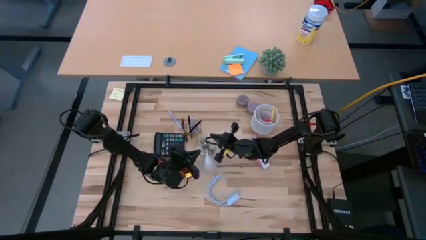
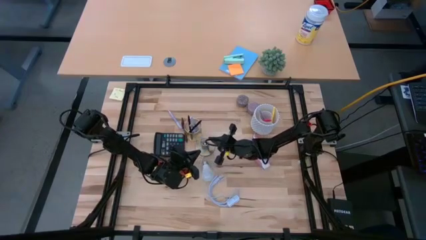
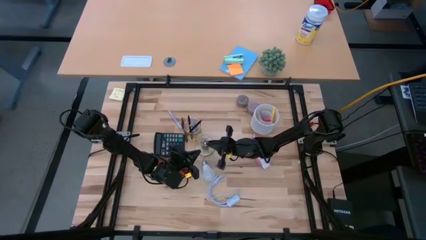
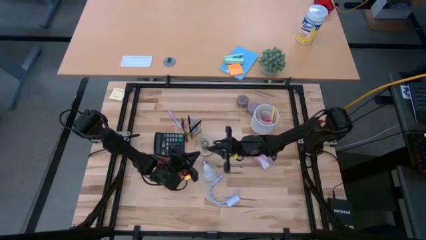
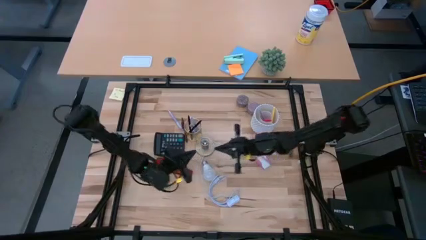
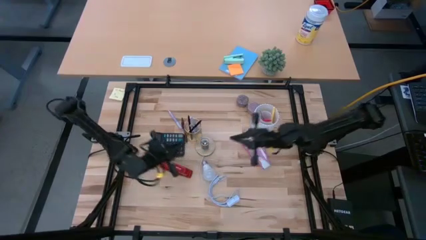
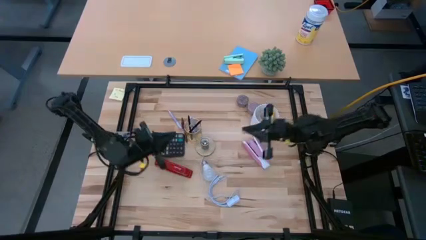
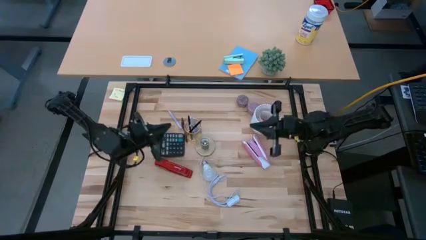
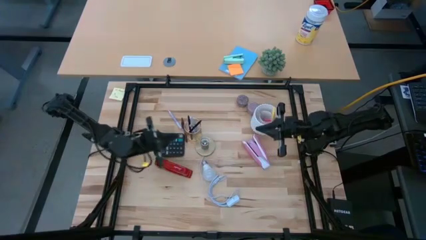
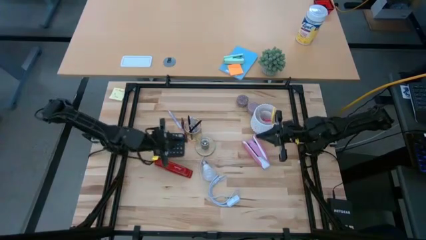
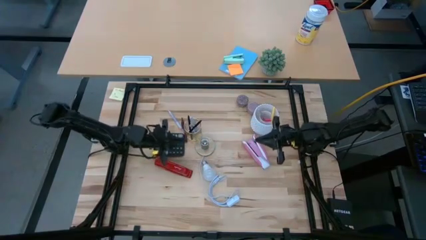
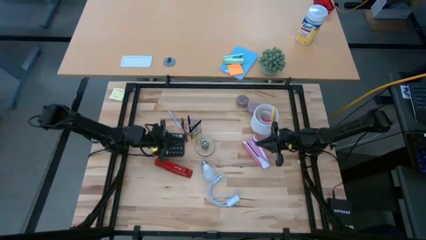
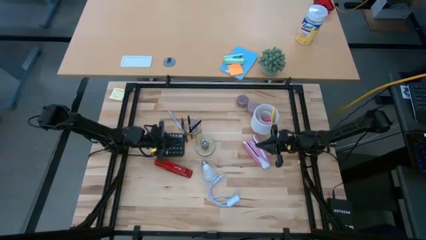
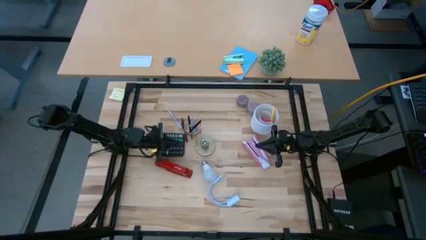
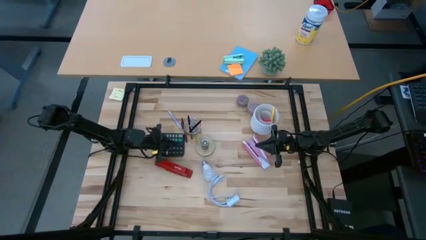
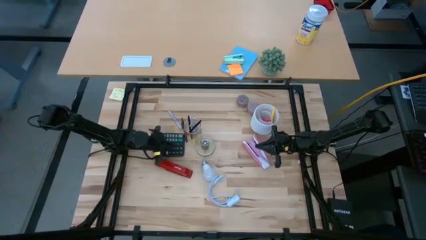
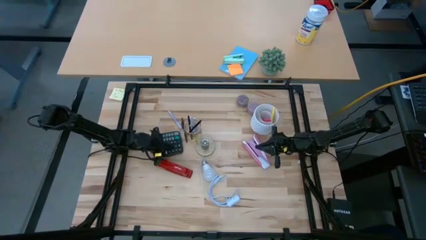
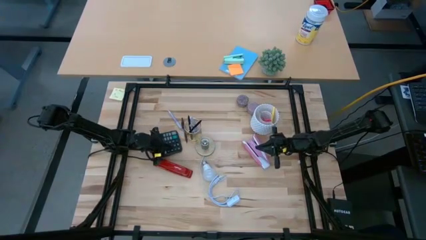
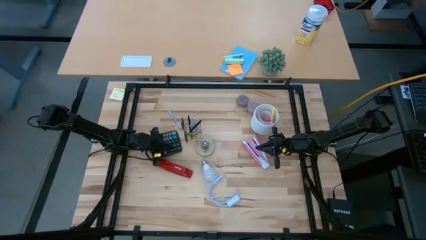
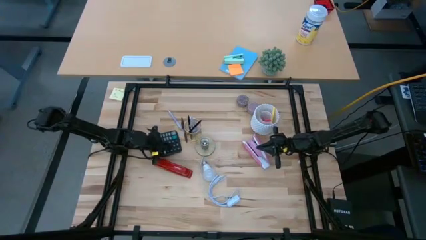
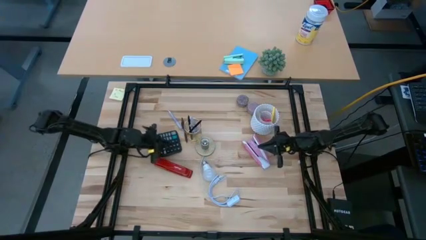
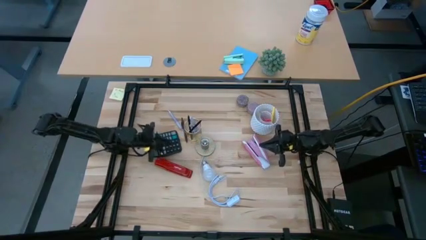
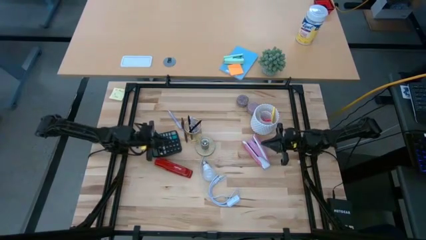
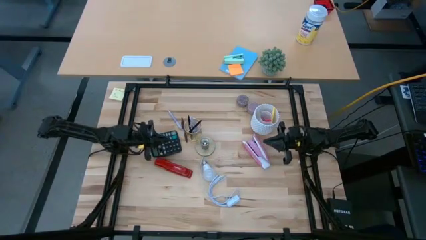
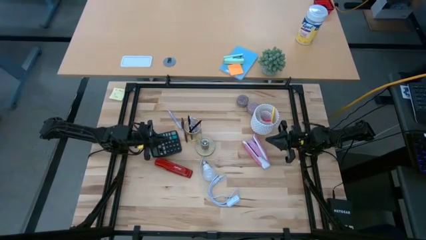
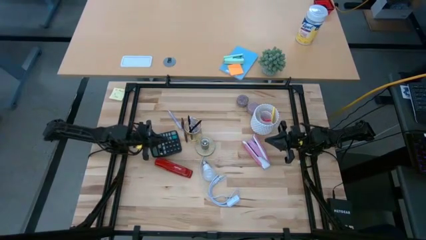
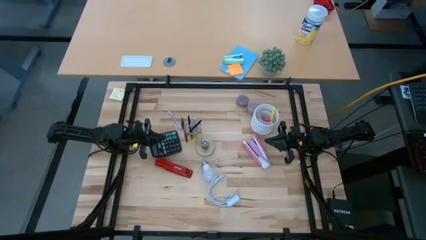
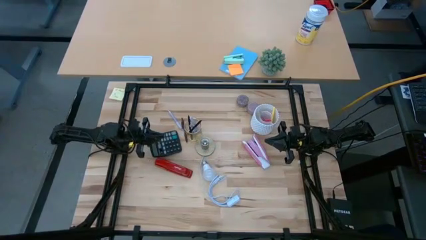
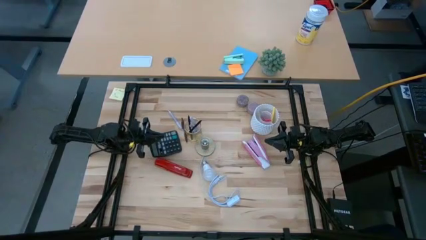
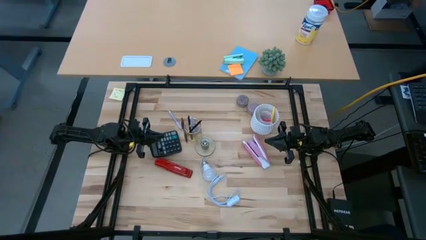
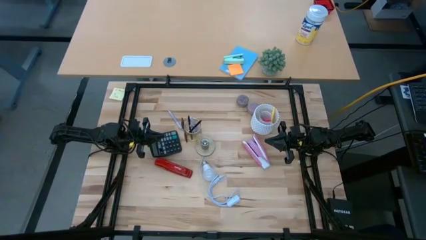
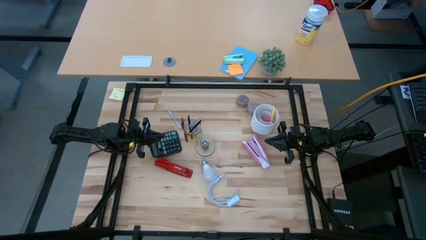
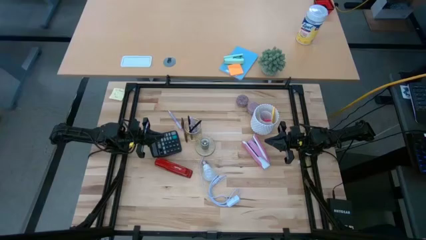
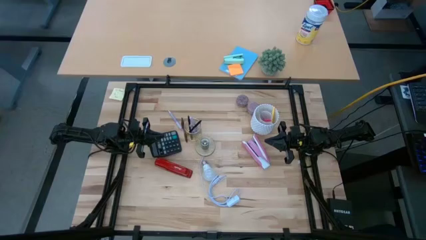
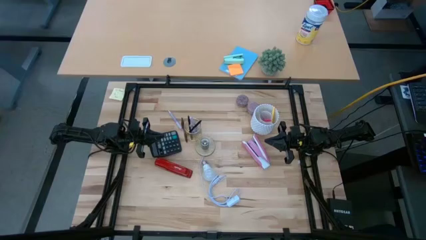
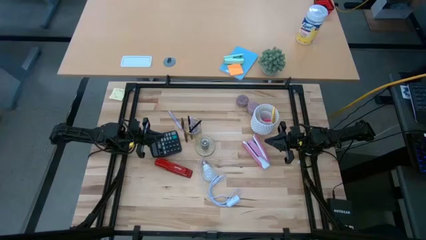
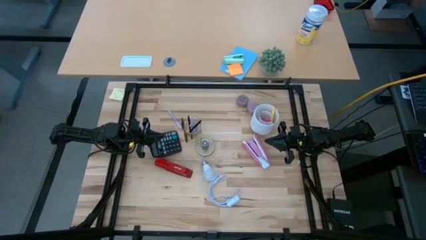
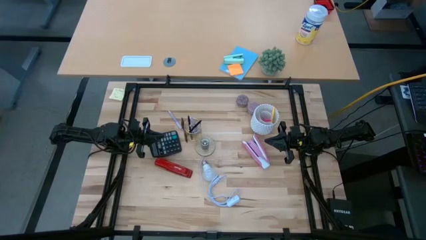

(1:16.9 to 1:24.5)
Task: Screw lightbulb
Return to Home Position

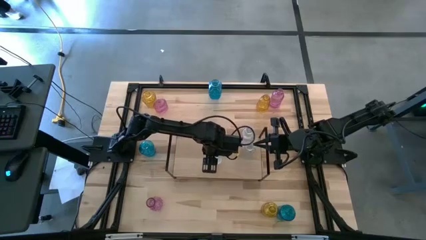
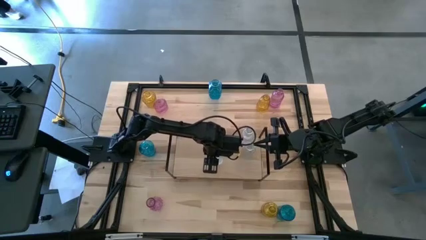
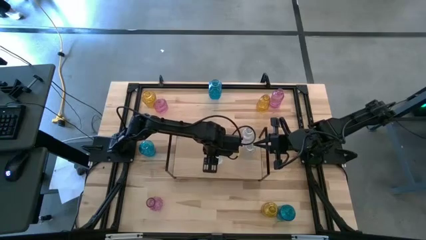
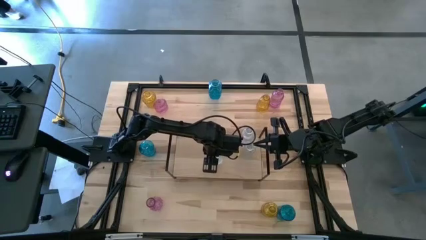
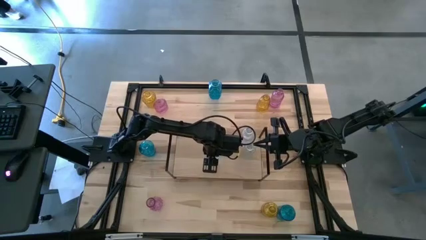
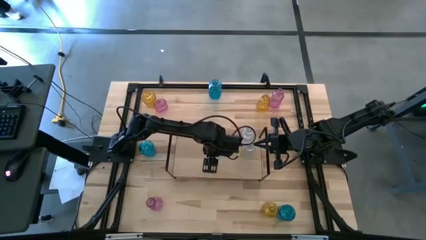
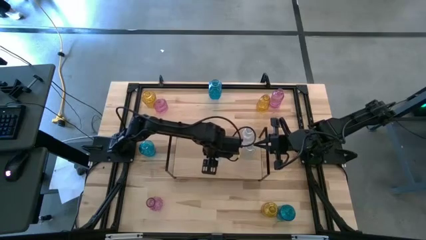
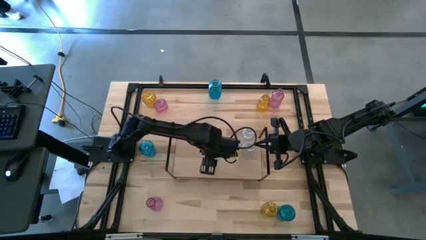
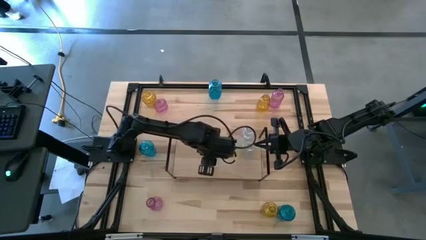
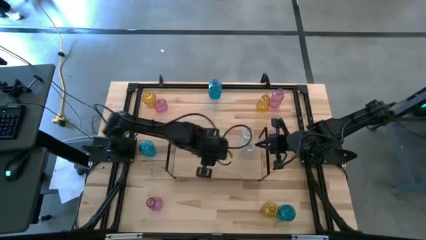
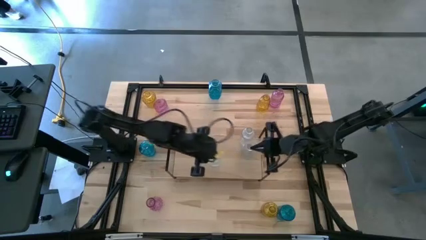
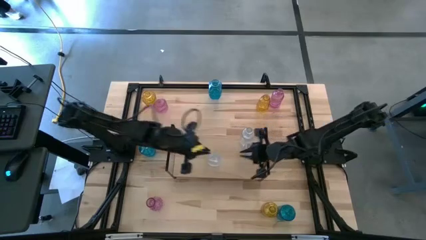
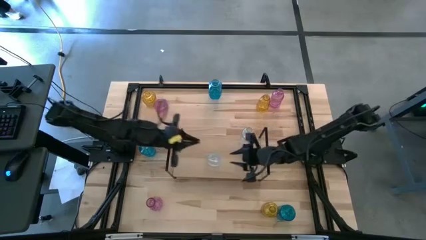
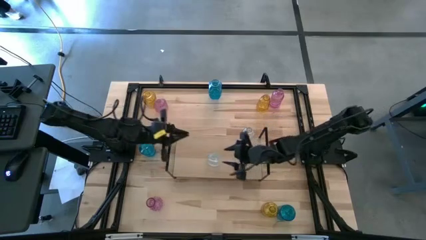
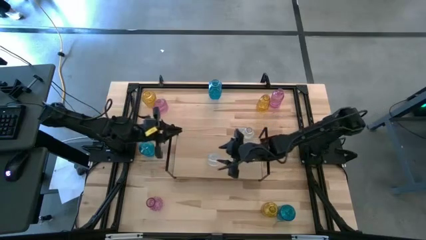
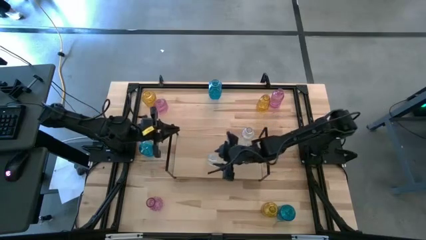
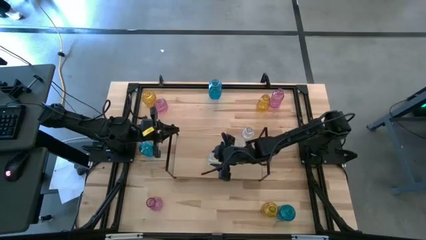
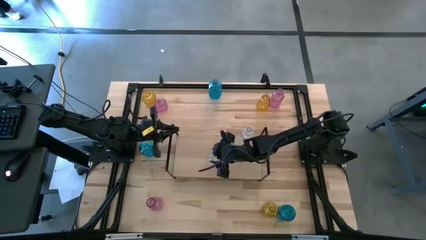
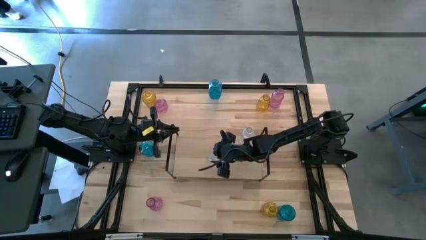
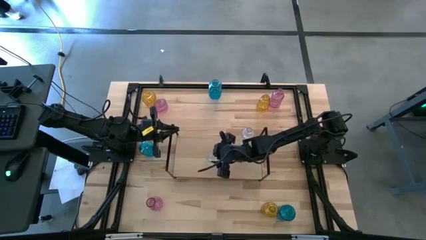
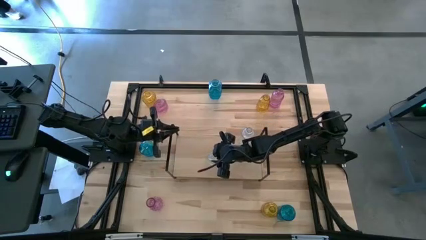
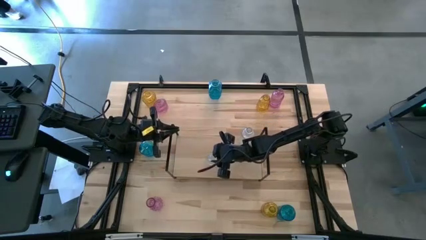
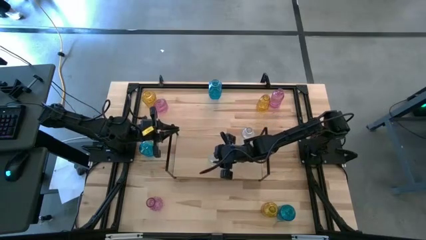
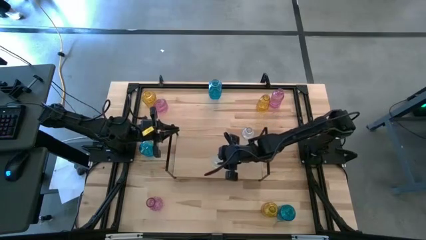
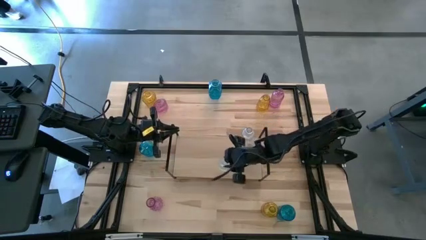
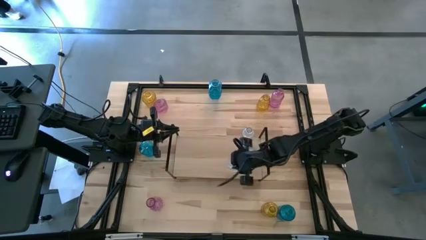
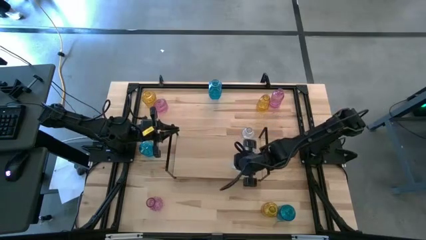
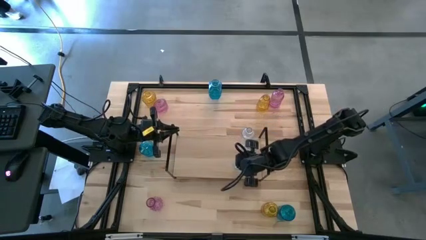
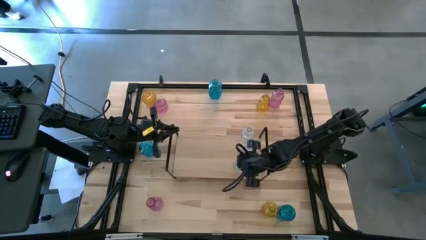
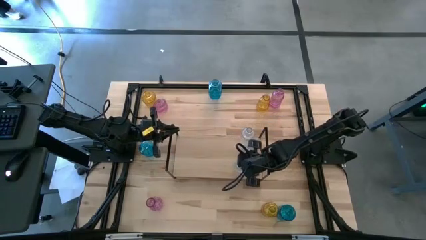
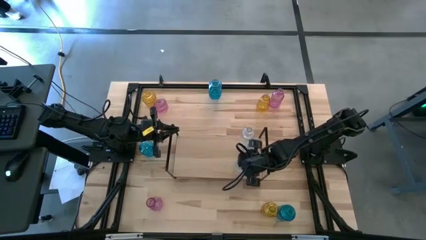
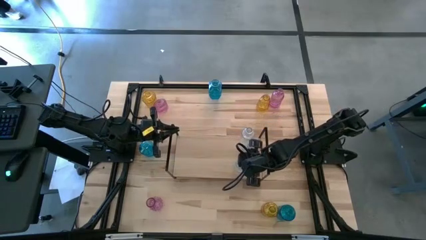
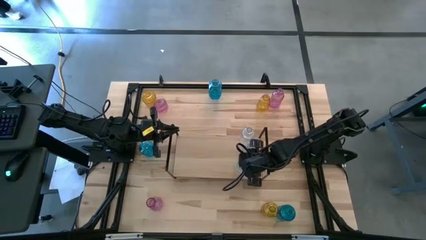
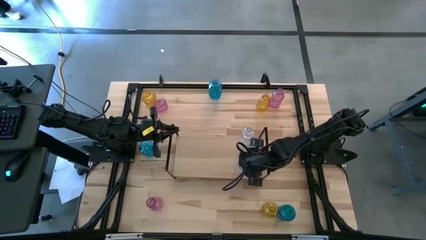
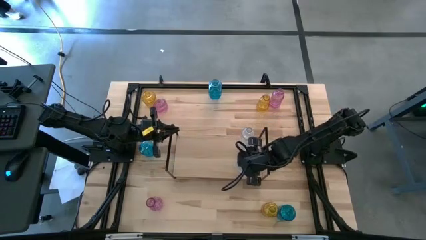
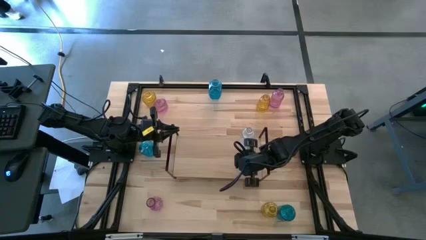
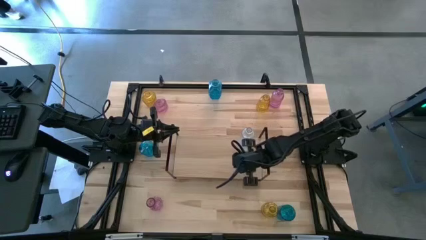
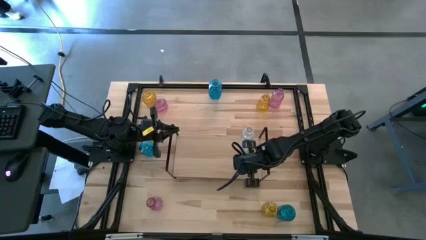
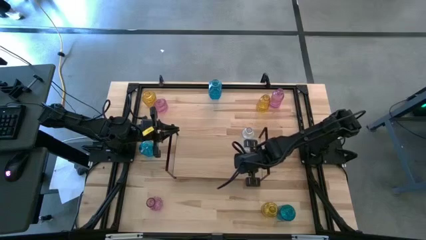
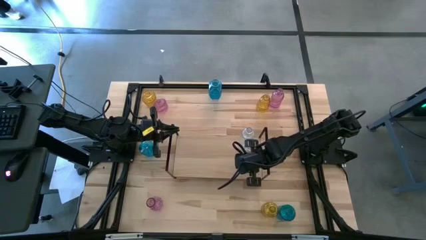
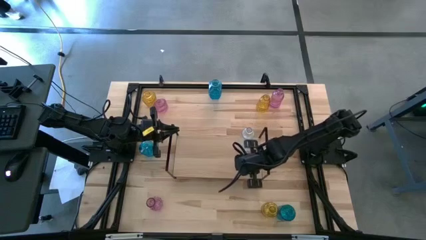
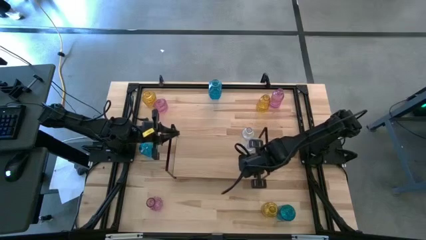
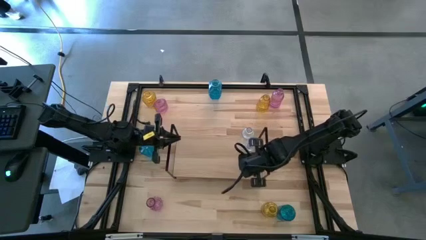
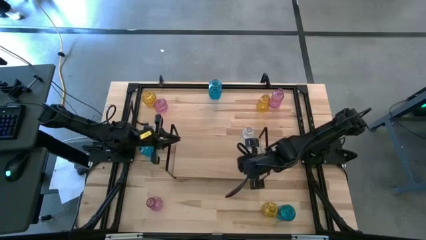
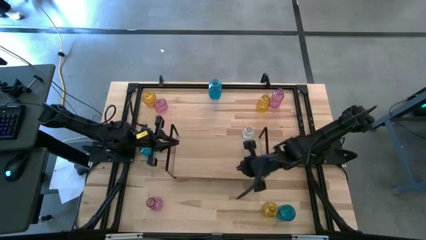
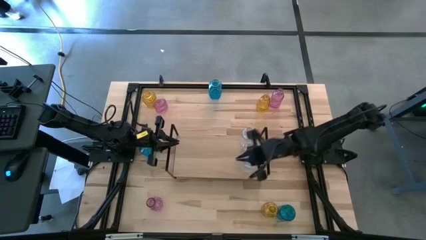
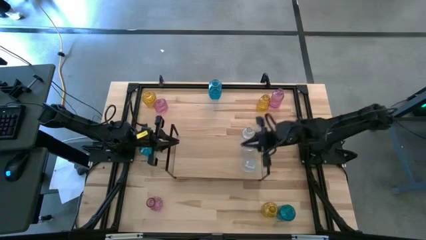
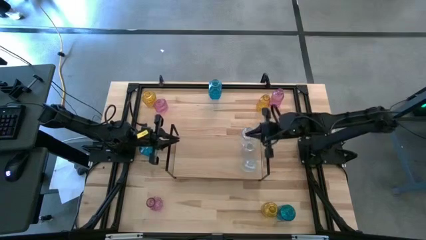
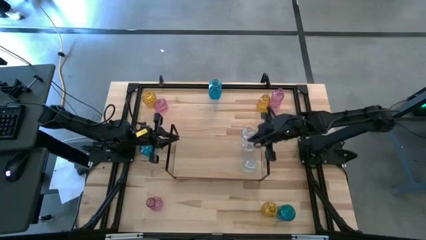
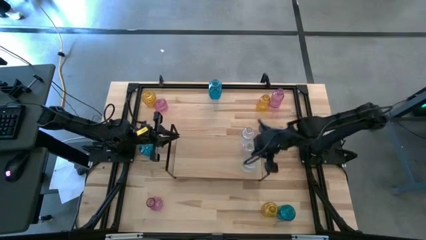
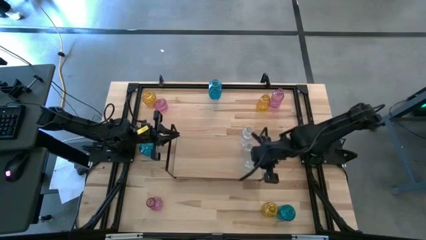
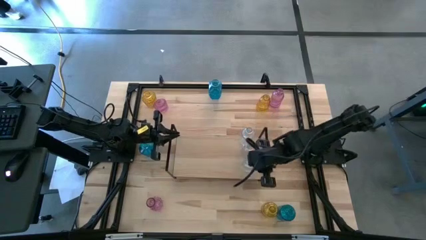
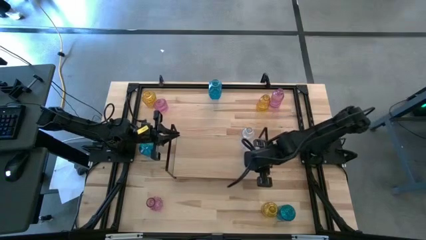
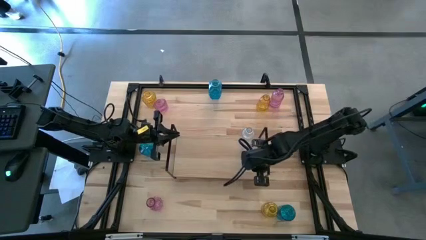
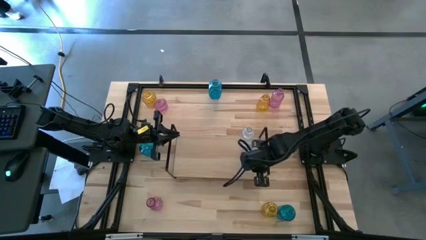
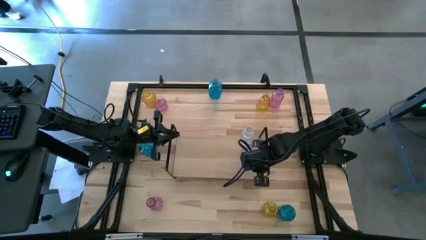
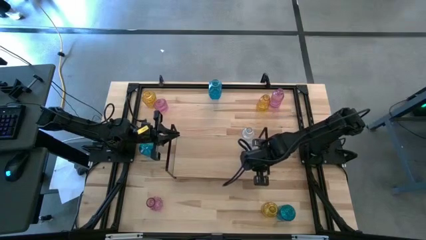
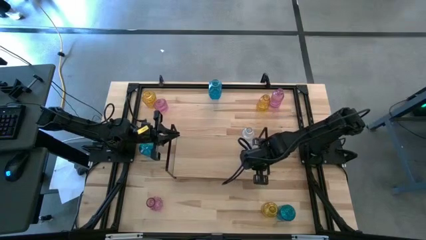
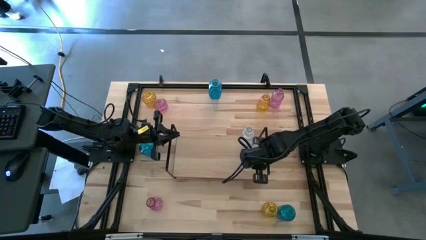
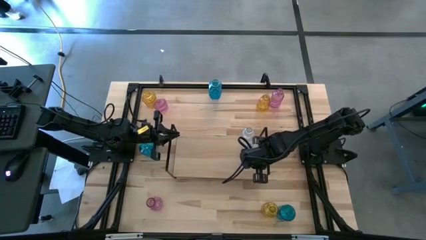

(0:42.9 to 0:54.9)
Task: sort vases onto shelf
Put the transparent vase on the shelf aligned with the other transparent vases
